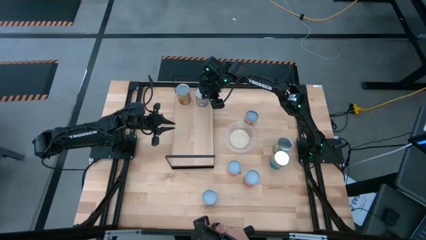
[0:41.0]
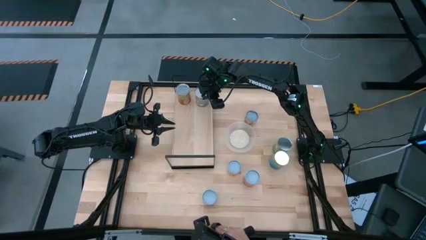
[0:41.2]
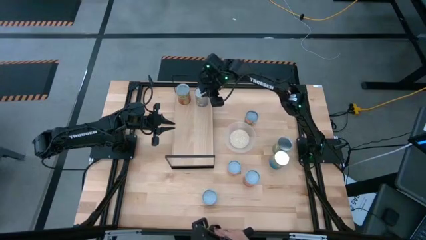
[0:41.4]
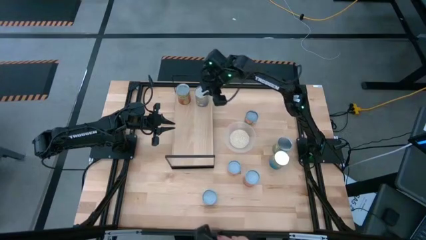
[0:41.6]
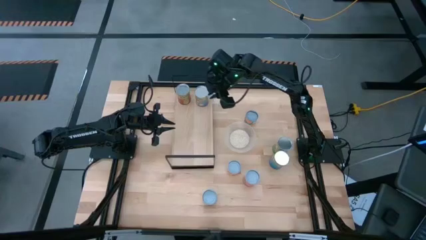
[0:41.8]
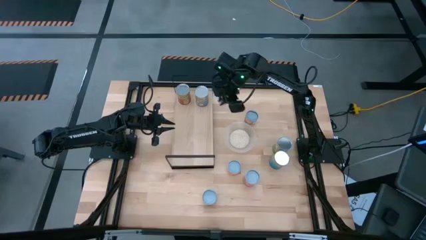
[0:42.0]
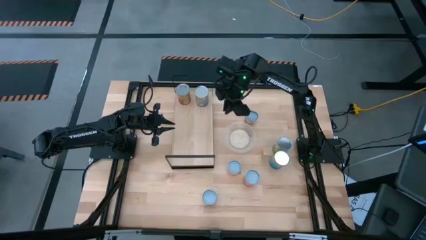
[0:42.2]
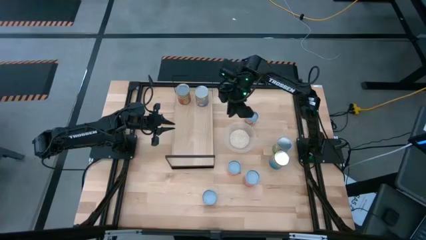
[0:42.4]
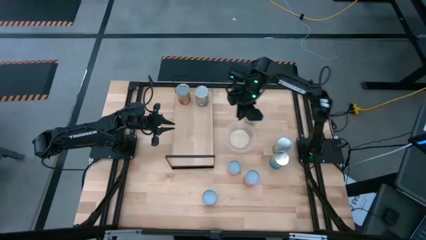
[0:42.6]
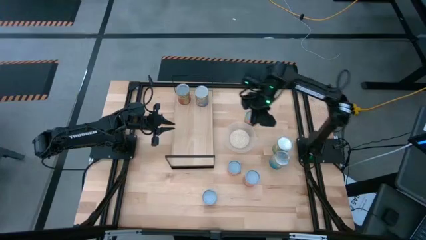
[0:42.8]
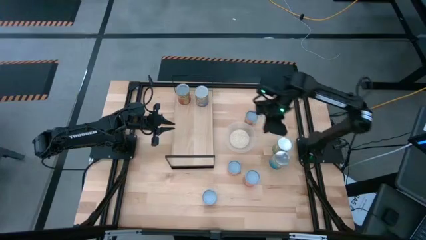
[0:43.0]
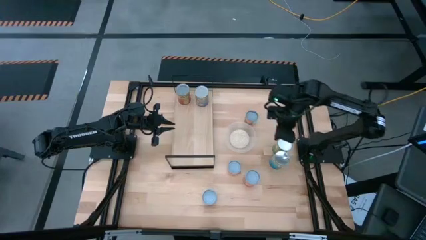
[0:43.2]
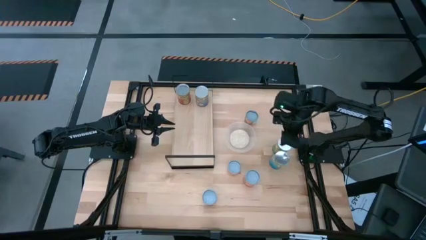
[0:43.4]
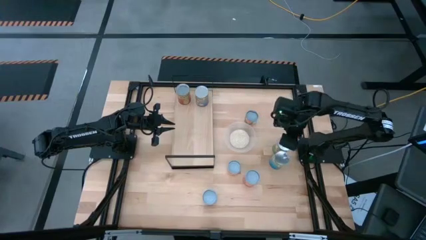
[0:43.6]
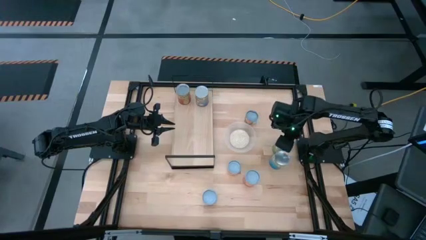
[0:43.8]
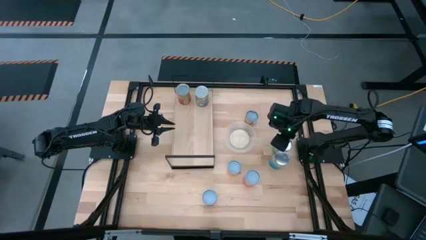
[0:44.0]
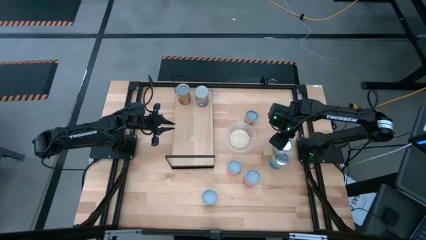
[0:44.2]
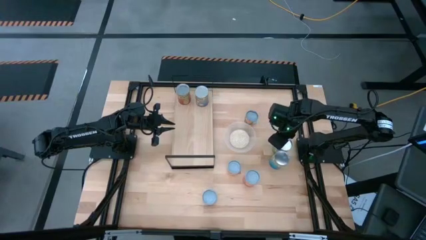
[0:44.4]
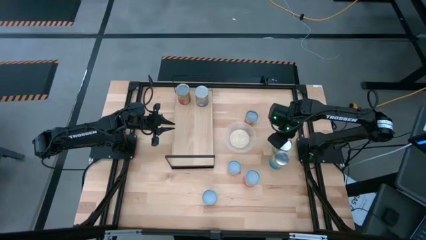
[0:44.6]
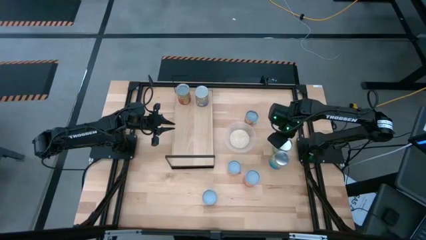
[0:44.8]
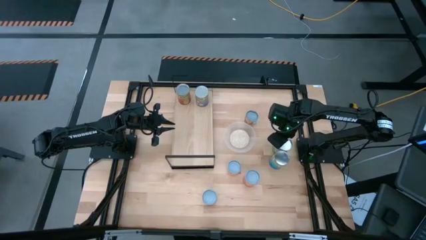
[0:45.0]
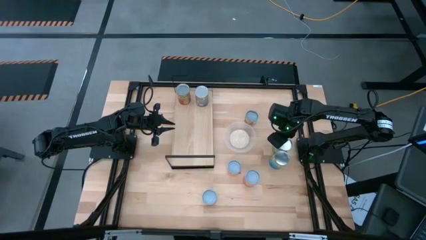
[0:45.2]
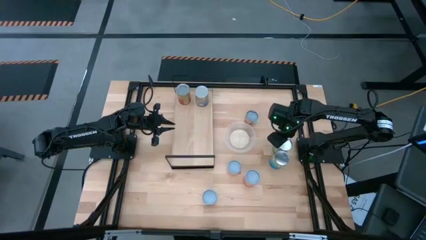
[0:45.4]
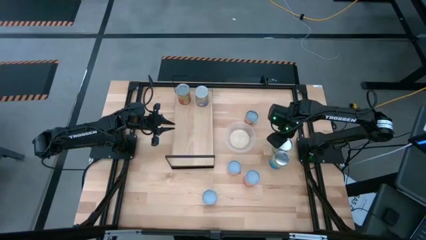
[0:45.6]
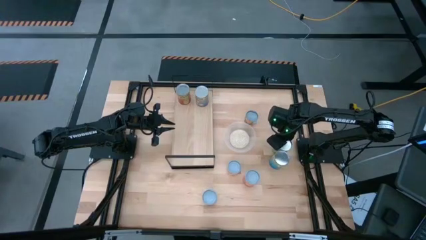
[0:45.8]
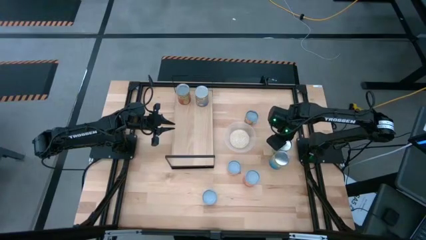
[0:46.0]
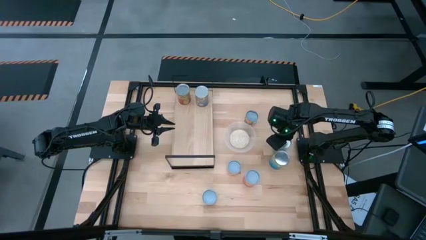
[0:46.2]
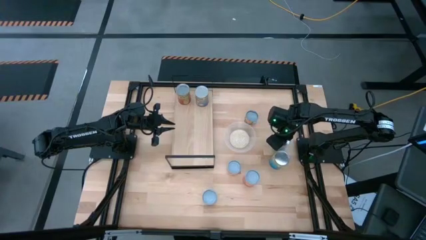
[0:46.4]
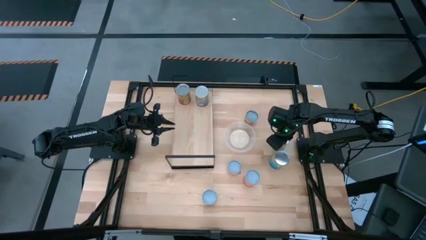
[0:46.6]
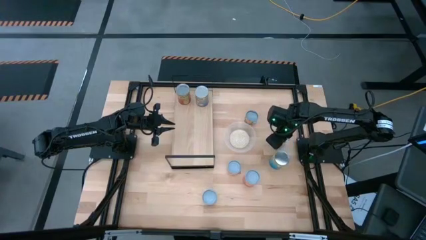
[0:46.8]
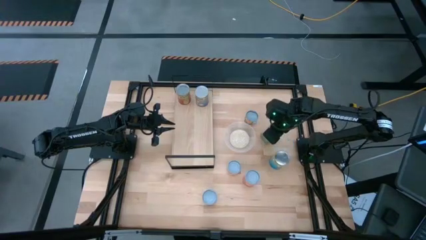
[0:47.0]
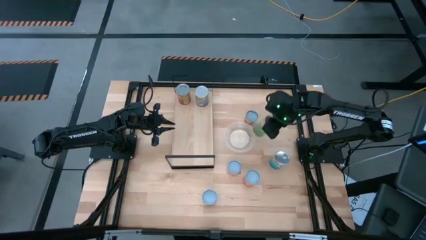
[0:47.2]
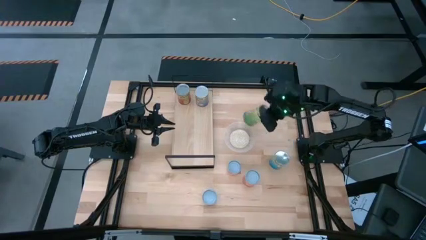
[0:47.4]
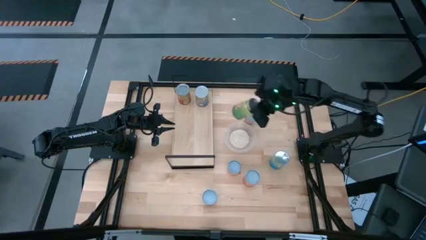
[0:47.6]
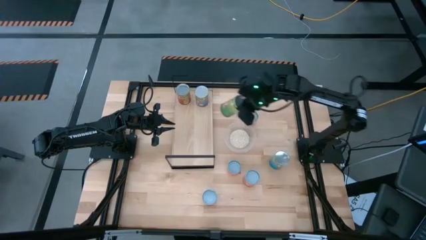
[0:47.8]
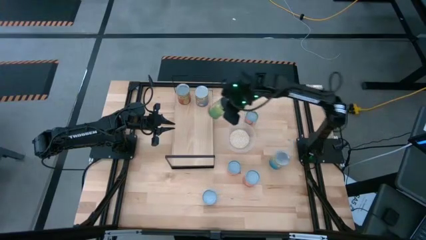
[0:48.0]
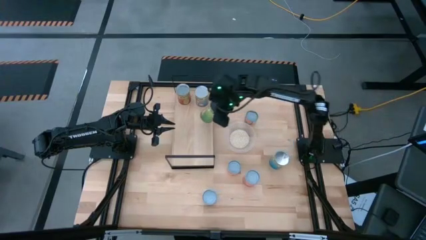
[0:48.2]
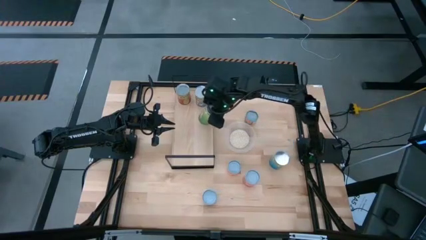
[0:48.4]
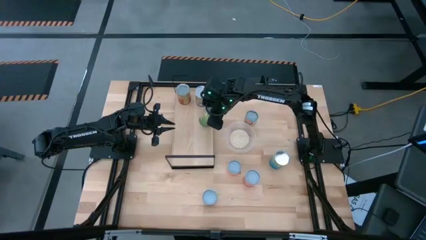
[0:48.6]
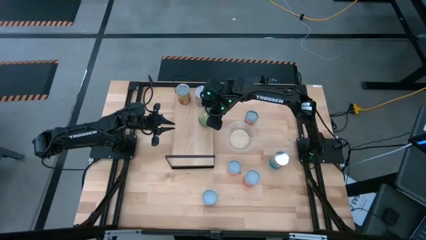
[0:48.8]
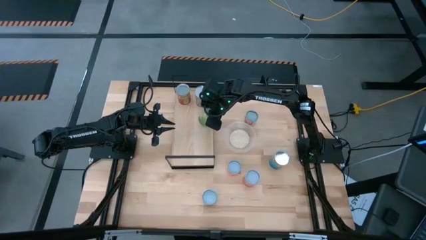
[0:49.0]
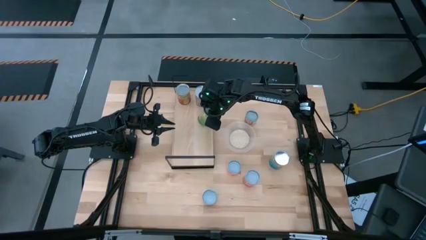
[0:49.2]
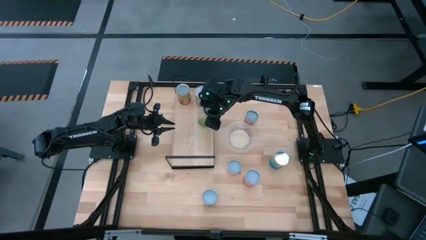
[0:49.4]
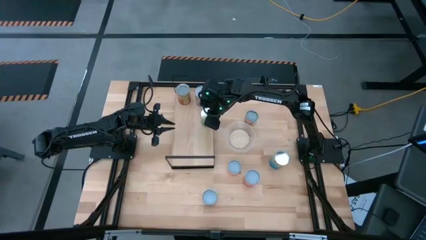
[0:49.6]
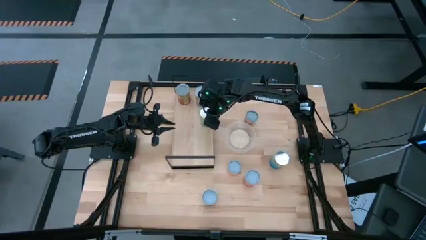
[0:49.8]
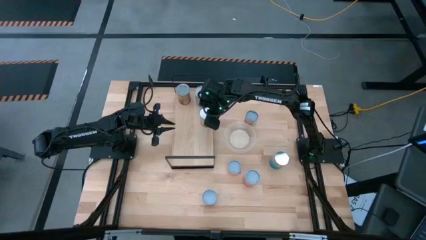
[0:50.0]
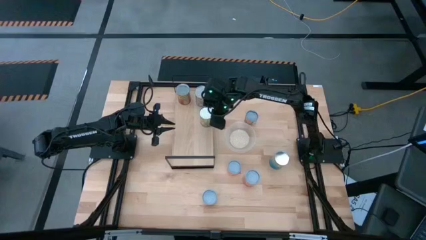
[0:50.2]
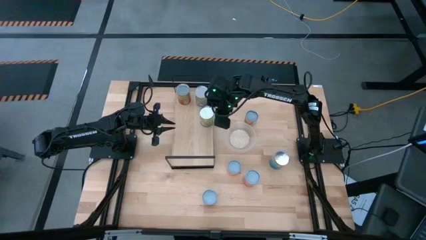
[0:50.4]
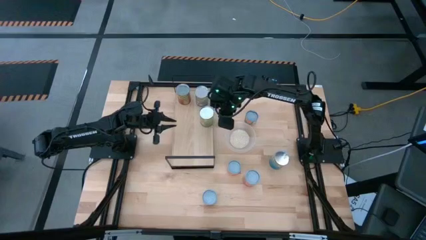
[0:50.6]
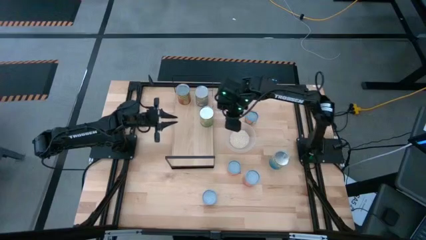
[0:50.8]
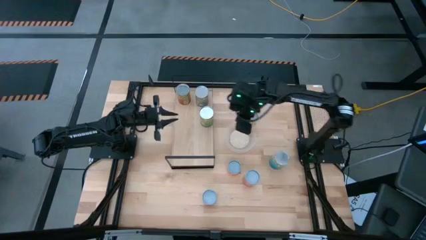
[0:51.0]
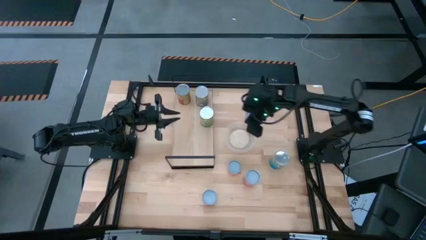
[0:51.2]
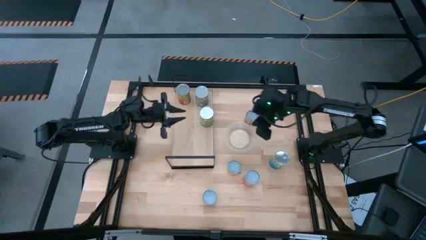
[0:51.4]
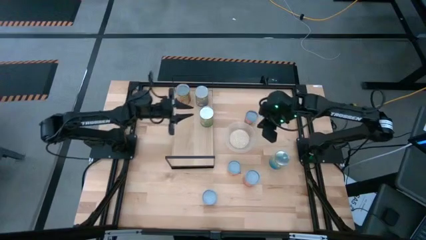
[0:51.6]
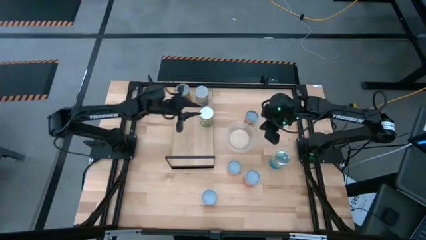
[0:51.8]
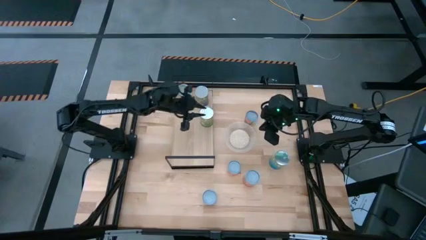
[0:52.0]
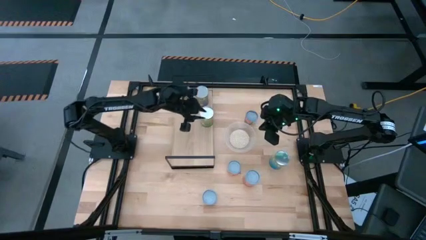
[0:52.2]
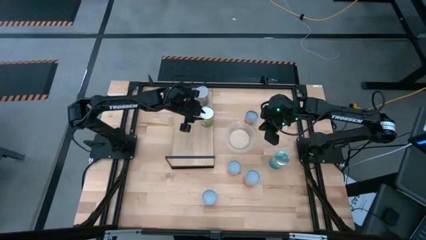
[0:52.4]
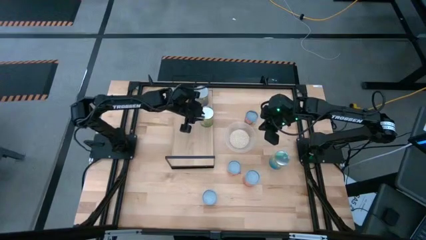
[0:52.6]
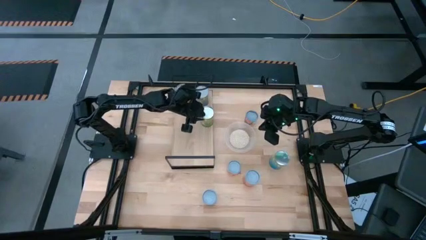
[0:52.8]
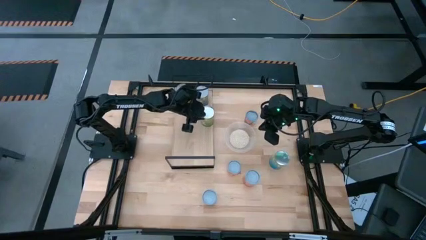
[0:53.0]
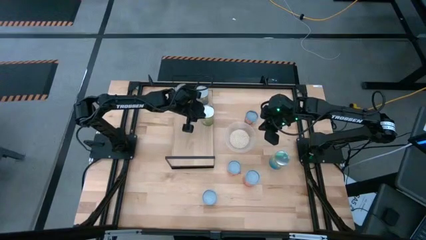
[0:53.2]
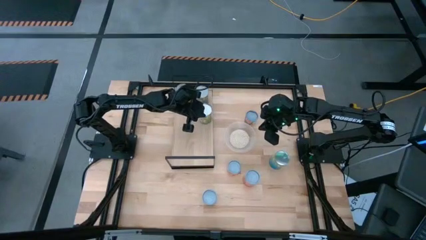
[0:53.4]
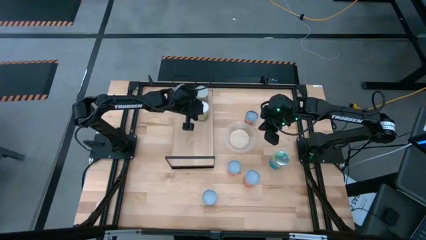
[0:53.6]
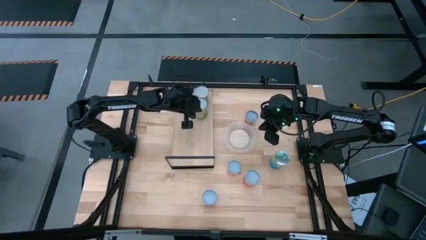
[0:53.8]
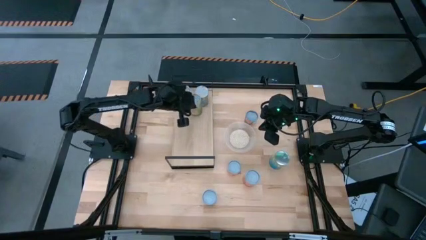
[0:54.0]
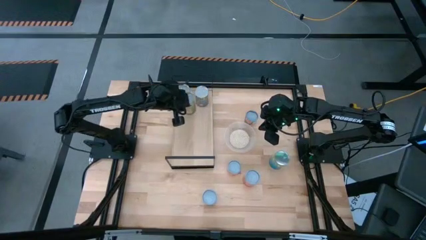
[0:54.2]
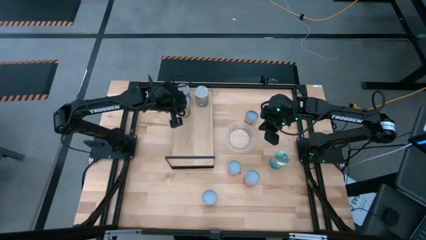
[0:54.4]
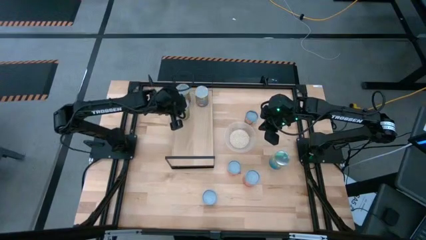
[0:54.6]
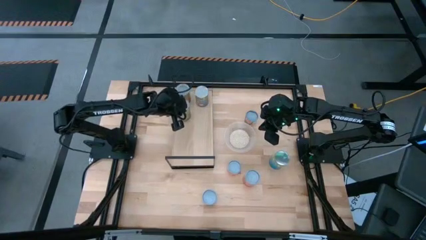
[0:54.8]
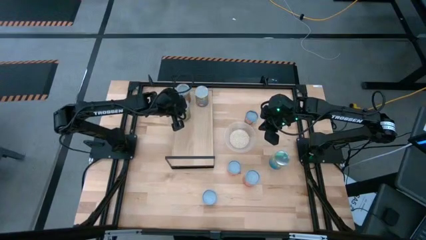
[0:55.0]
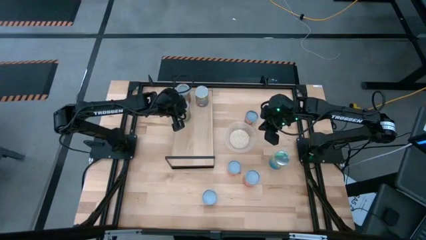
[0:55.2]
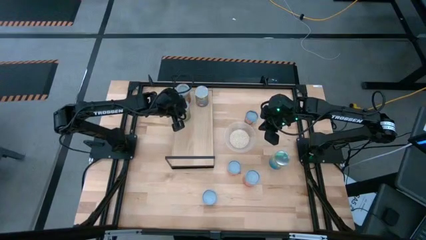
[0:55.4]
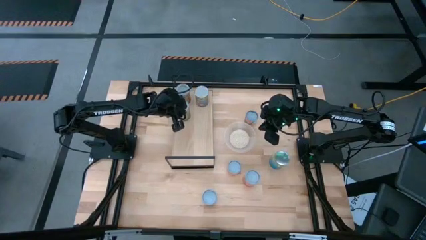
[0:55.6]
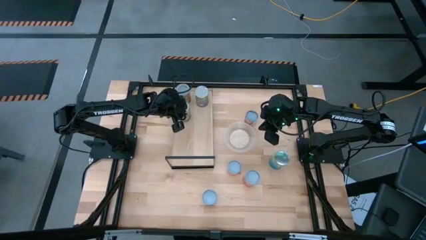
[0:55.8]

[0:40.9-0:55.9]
Task: Pick and place cans onto a shelf
Put the large canned oranges on the shelf
